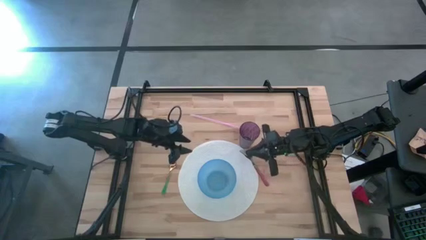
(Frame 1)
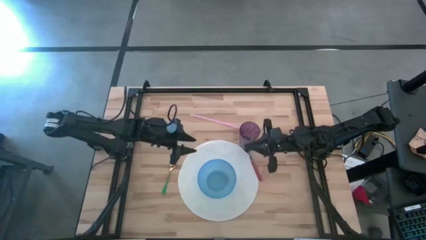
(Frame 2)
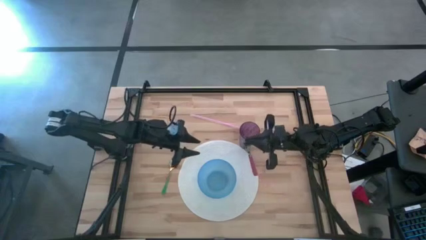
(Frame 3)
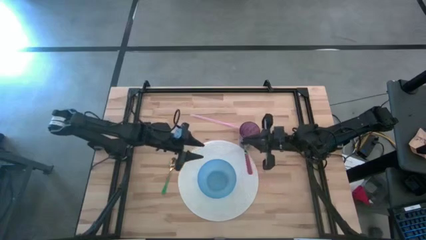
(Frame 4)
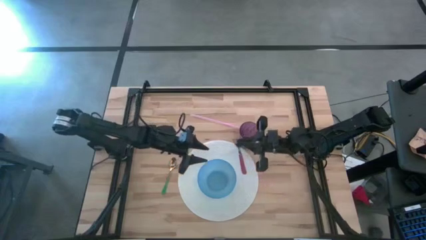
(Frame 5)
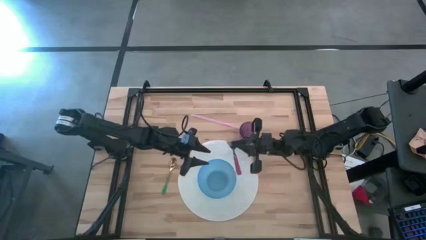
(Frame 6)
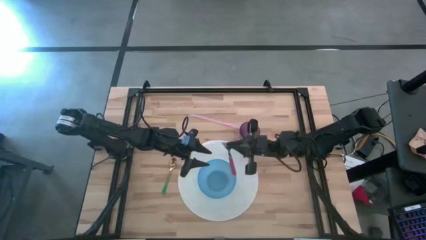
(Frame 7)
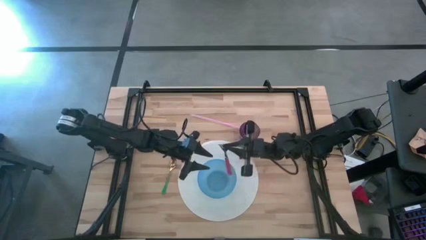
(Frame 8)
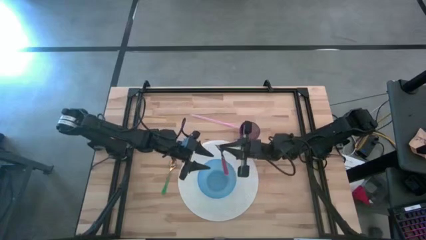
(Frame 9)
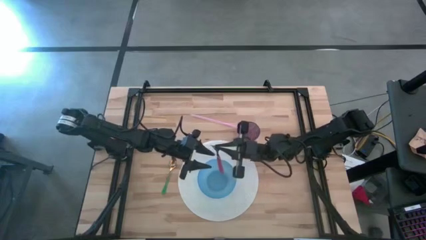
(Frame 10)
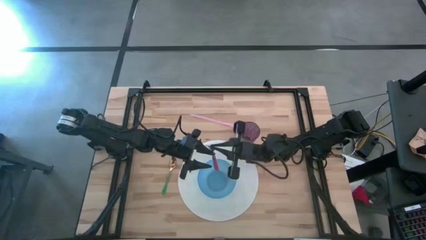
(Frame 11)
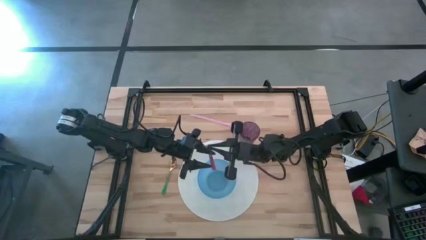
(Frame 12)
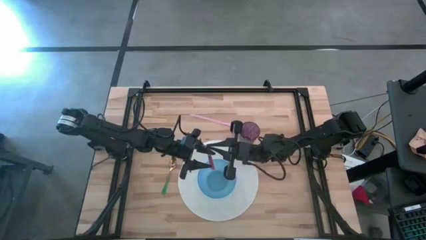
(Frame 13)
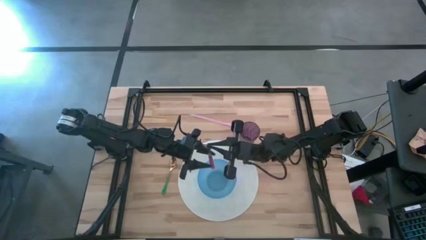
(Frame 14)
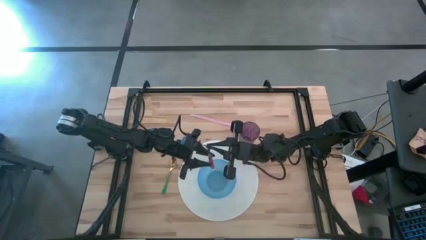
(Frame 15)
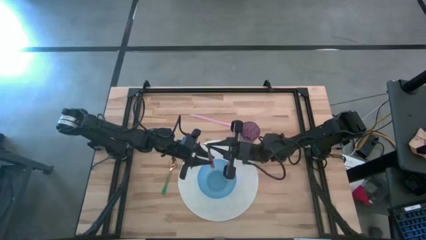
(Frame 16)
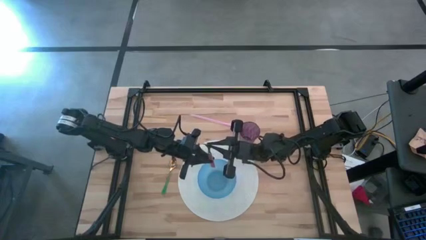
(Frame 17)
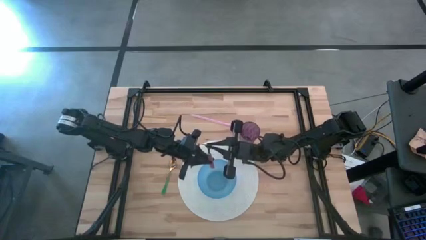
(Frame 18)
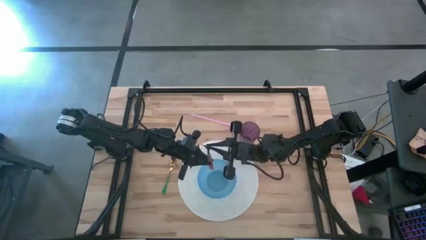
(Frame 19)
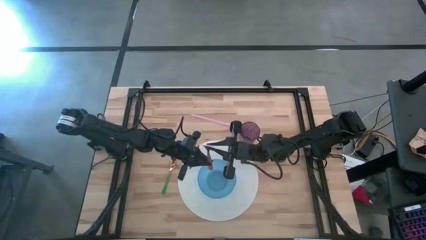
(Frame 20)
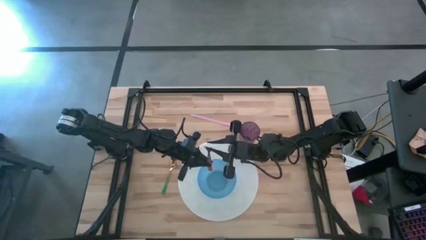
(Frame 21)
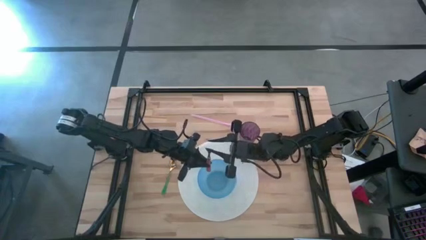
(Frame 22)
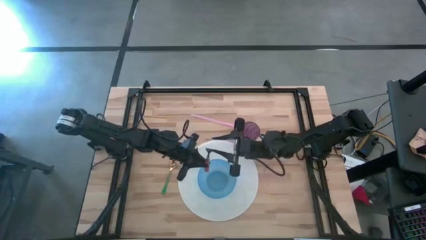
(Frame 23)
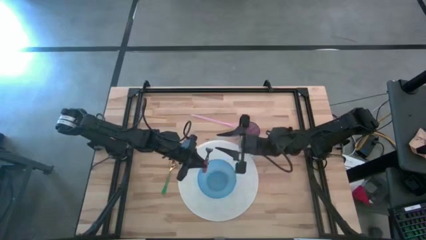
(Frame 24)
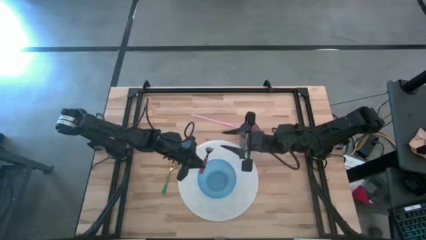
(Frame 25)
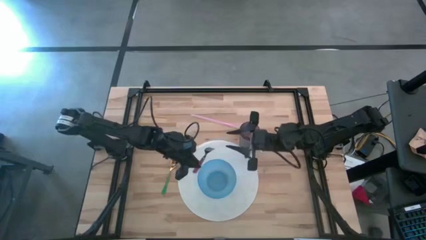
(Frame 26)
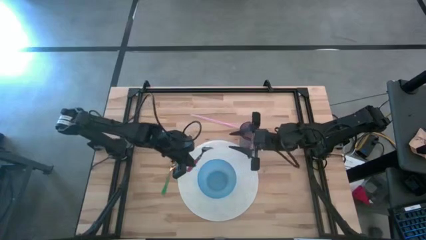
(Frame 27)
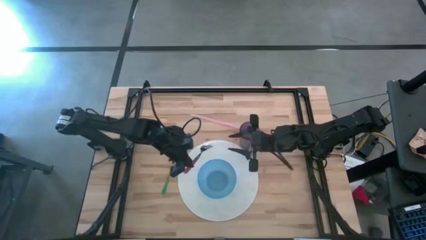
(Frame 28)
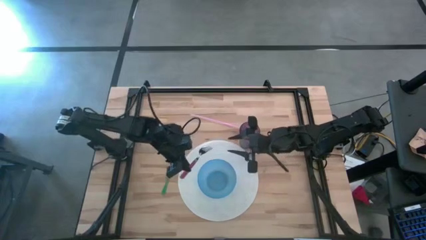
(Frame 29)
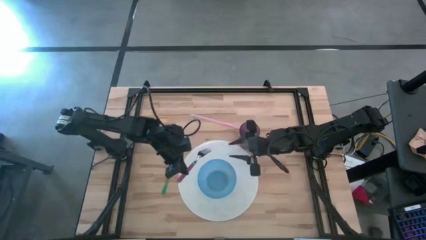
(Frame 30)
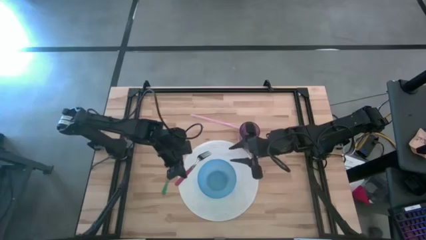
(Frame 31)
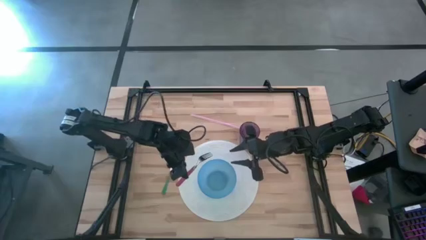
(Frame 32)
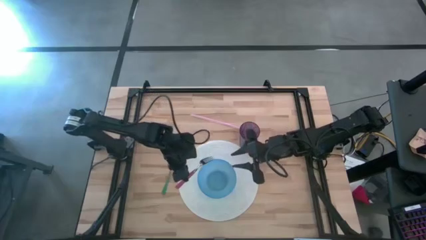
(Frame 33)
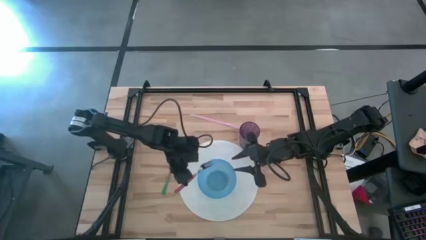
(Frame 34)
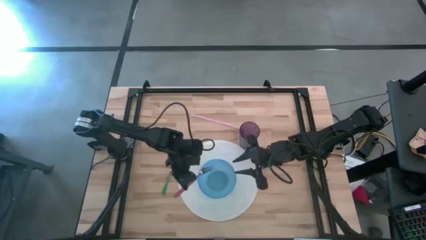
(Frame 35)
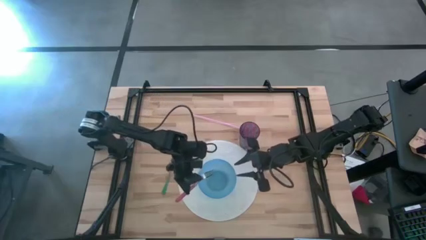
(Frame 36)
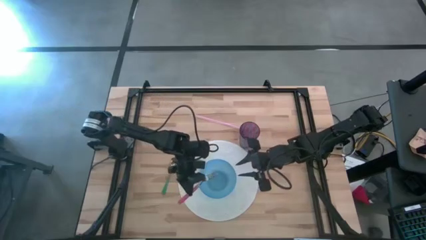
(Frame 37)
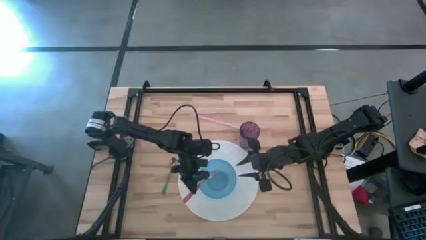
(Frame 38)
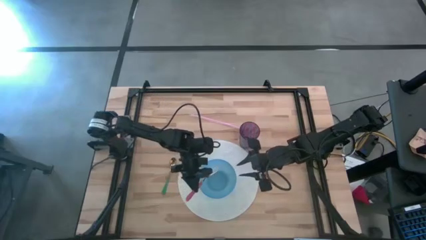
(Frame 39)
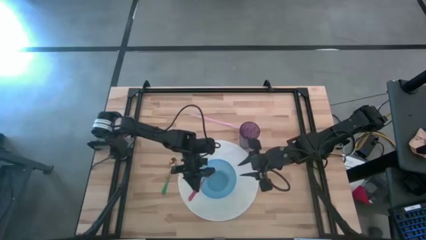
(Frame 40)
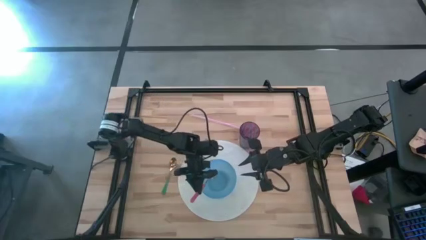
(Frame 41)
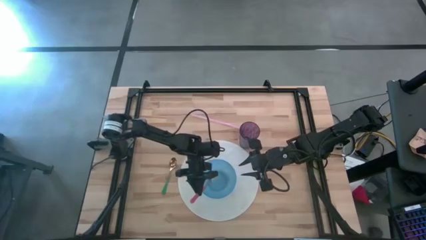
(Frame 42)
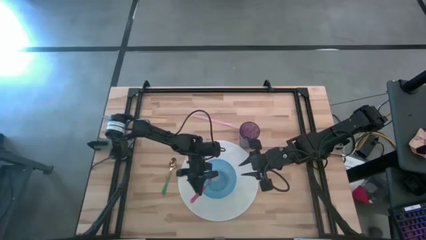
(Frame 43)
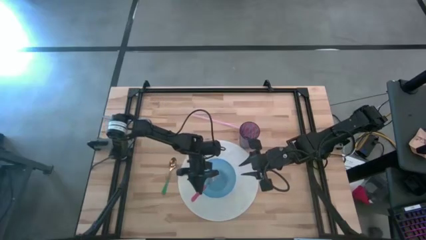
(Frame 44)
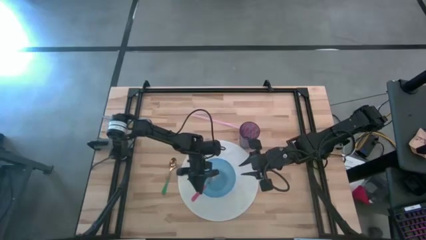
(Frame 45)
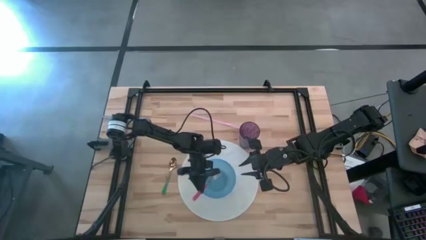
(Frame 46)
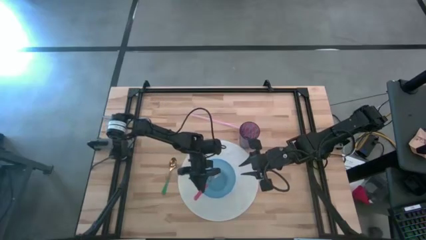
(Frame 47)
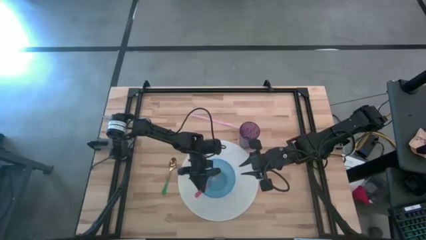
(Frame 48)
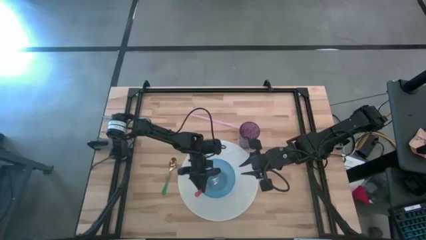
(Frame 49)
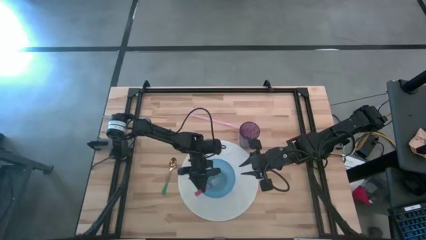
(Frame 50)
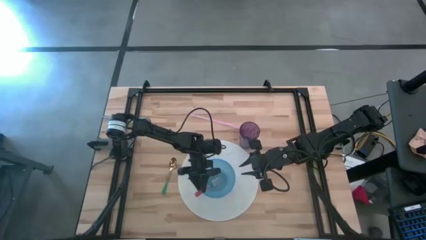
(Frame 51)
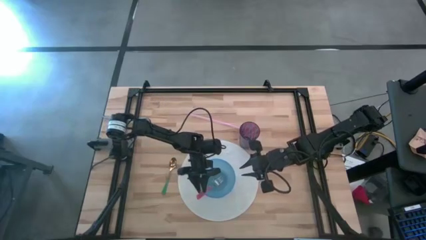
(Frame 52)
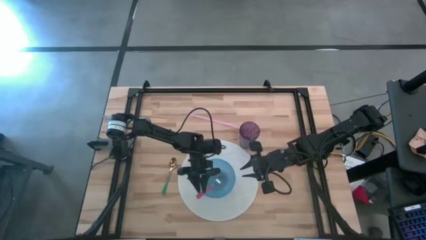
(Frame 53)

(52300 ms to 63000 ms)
Task: Pick & Place Utensil
Put the pink fork in the blue bowl

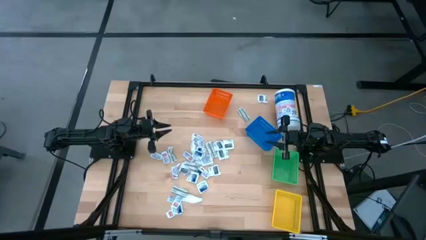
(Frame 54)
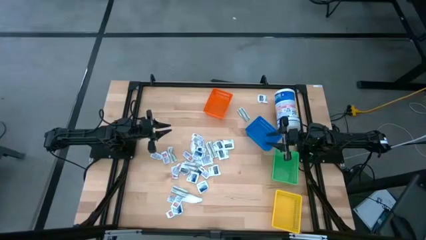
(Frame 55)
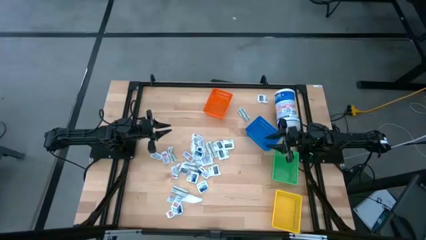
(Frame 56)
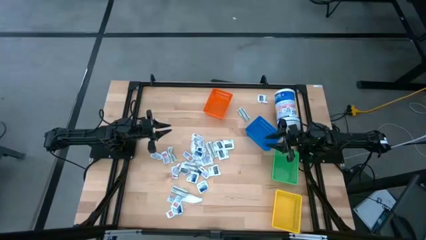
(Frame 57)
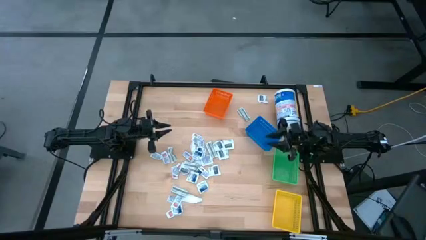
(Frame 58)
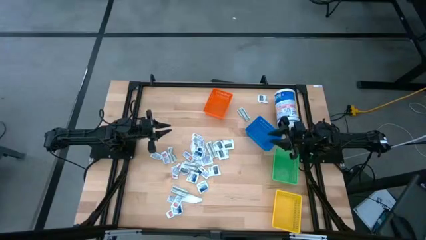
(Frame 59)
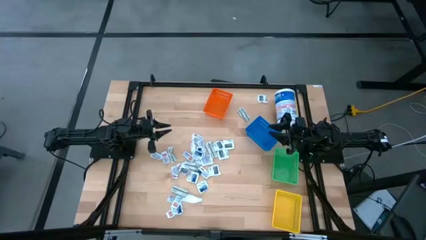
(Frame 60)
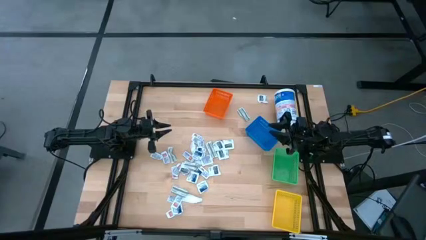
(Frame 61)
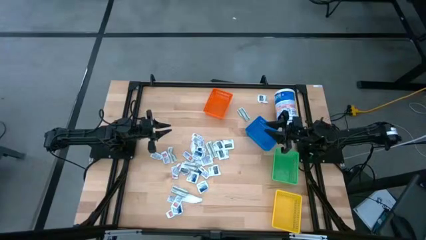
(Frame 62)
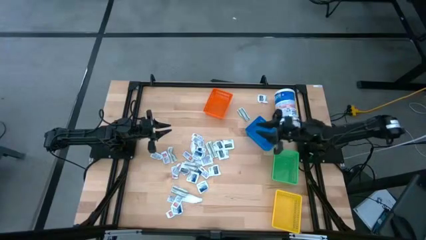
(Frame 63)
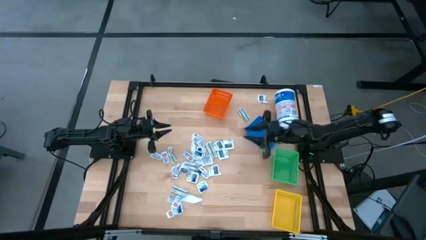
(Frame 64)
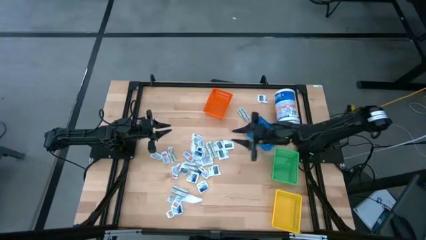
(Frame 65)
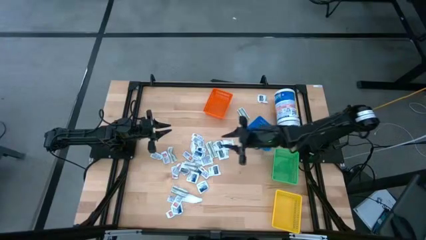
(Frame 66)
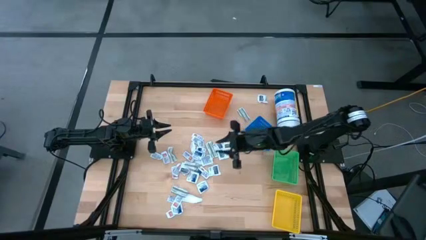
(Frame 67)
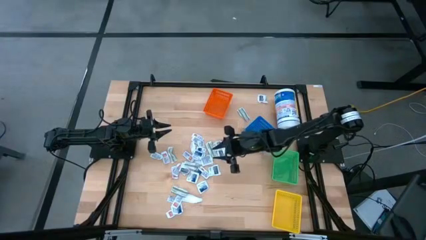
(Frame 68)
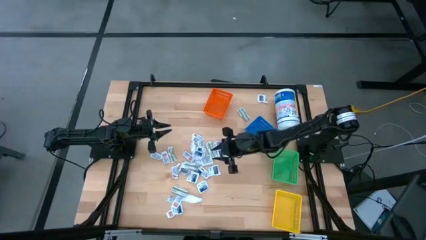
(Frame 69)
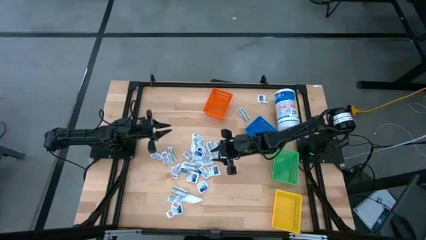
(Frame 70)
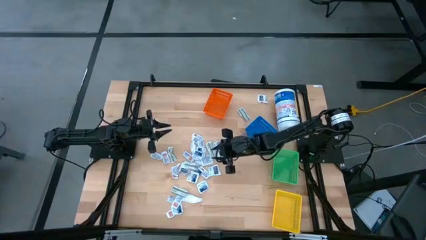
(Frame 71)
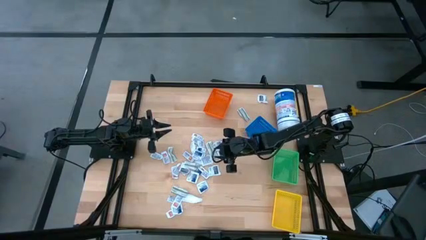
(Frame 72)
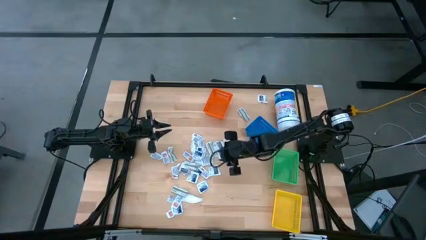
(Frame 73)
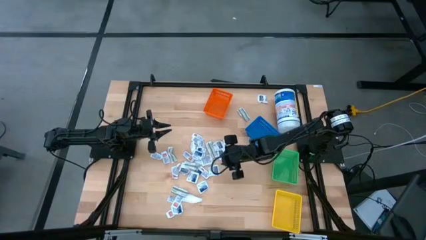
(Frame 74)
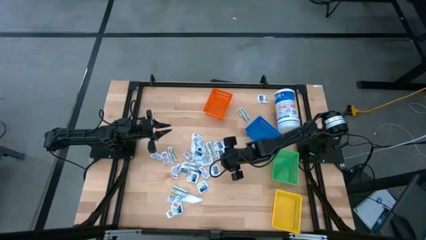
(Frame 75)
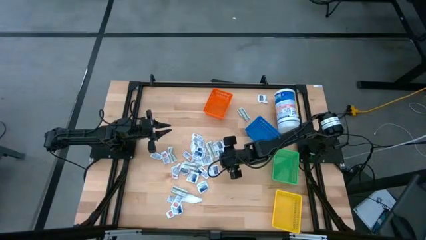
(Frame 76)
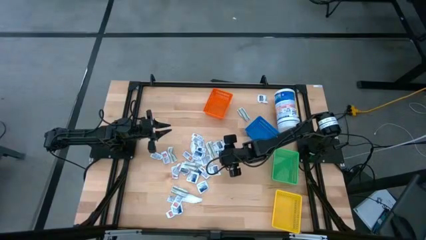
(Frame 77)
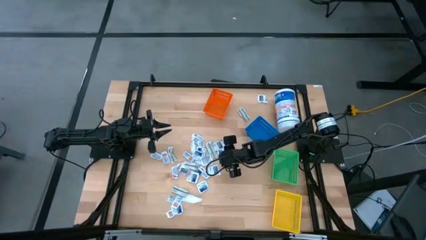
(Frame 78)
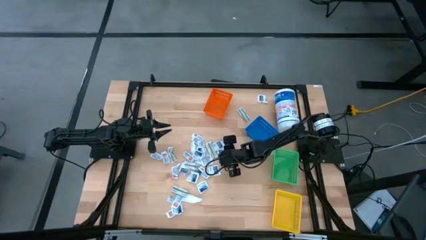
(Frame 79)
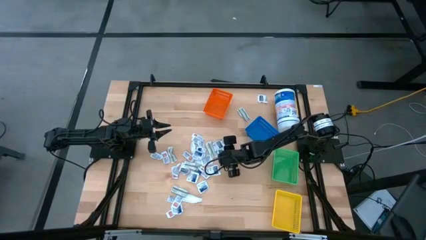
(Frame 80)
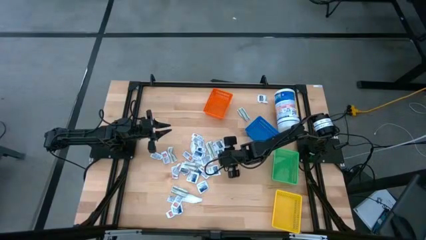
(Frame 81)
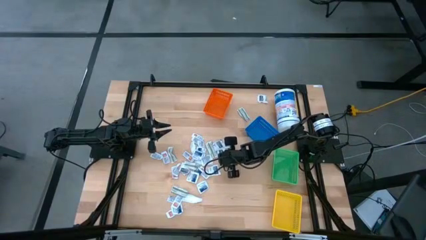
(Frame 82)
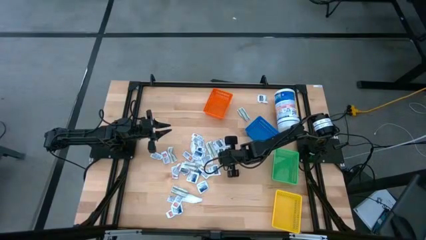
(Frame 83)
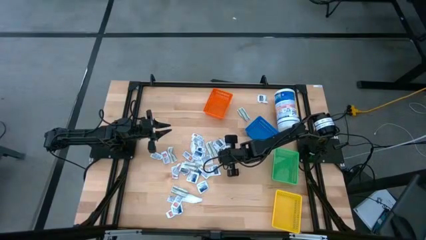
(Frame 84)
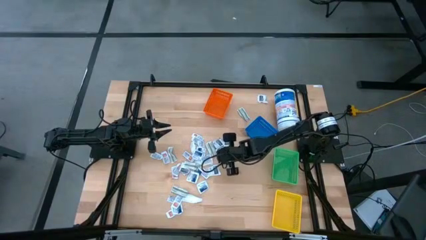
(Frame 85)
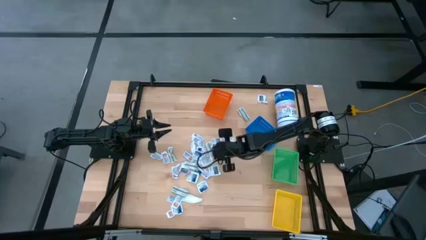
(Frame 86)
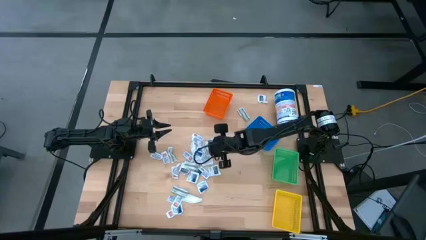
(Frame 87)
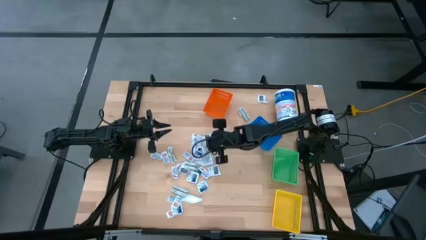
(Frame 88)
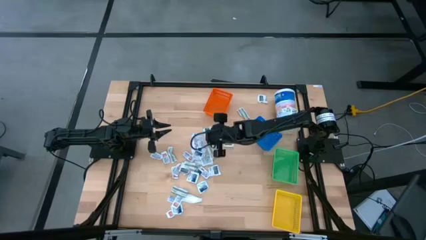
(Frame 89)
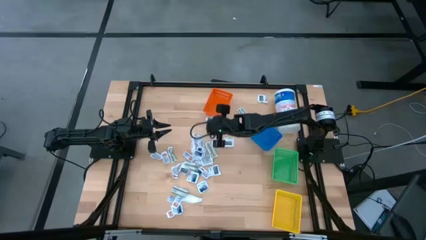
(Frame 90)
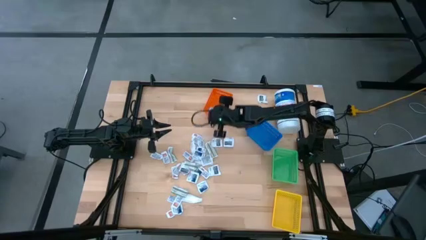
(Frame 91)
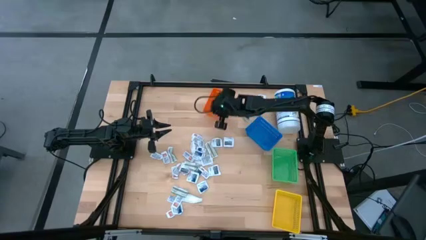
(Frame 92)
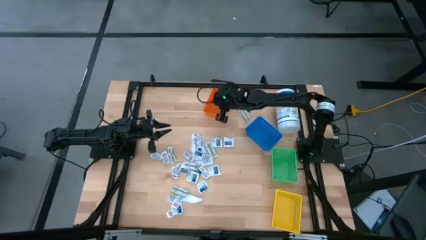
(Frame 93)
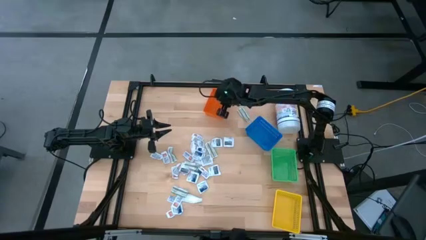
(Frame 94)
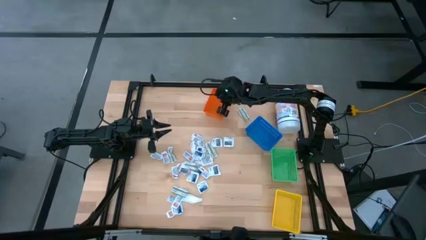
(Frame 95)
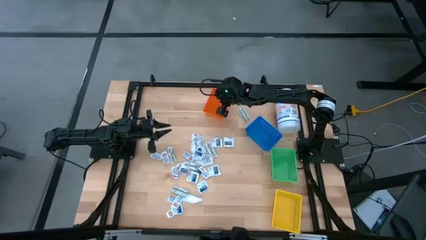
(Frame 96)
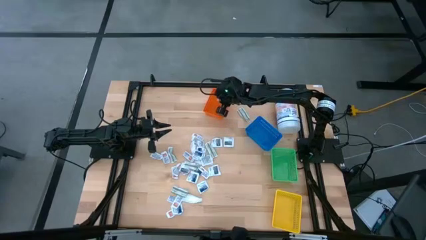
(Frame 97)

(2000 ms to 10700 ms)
Task: Pick & Place First Aid Supplies
Put the gray towelette pack into the orange basket
